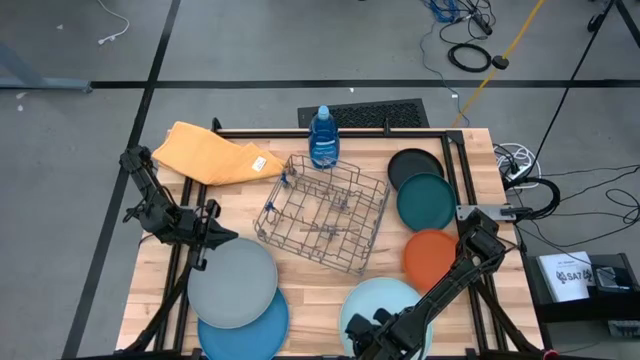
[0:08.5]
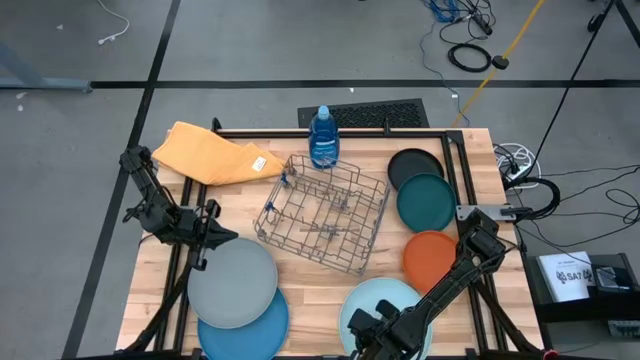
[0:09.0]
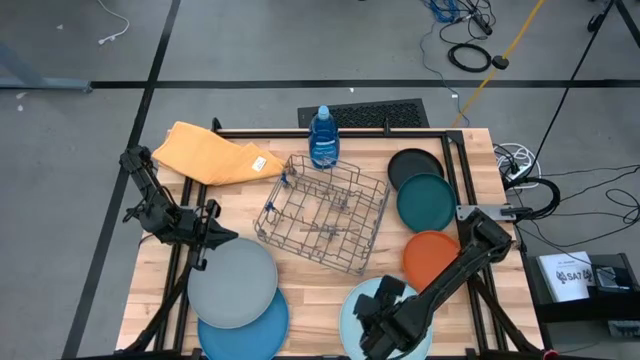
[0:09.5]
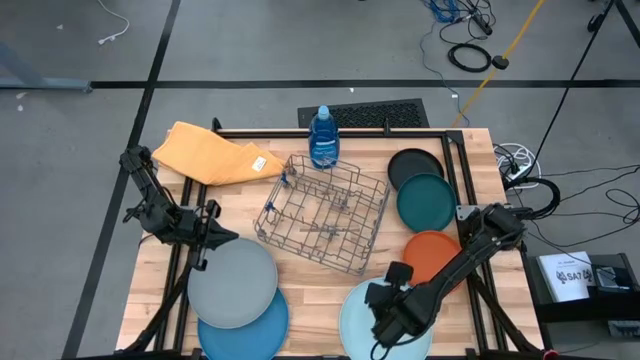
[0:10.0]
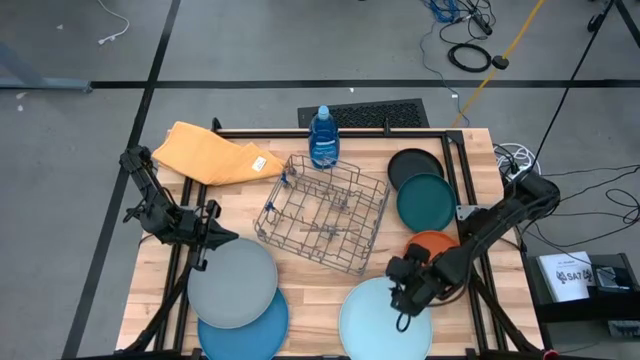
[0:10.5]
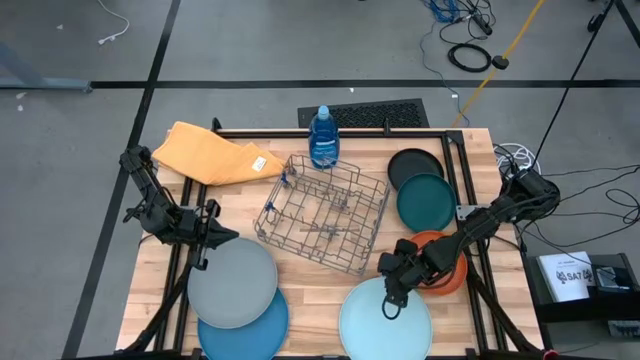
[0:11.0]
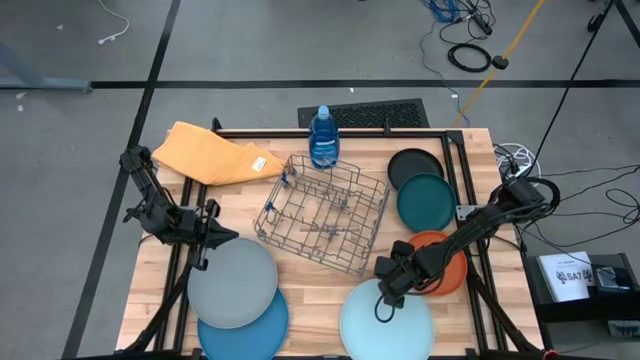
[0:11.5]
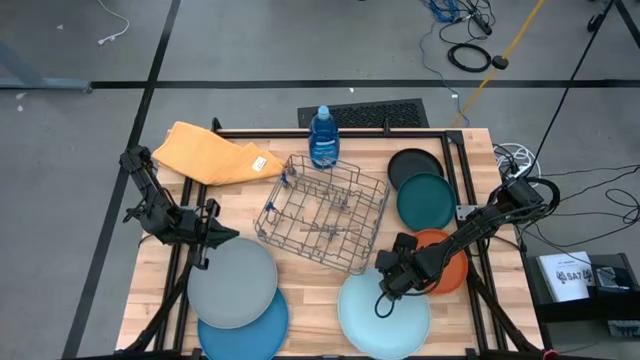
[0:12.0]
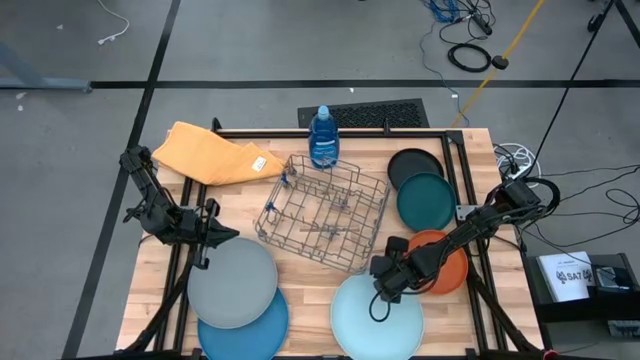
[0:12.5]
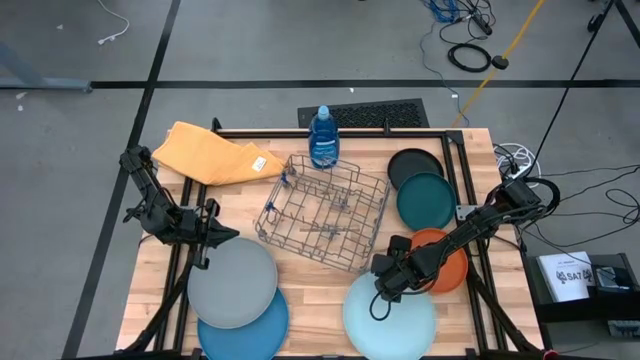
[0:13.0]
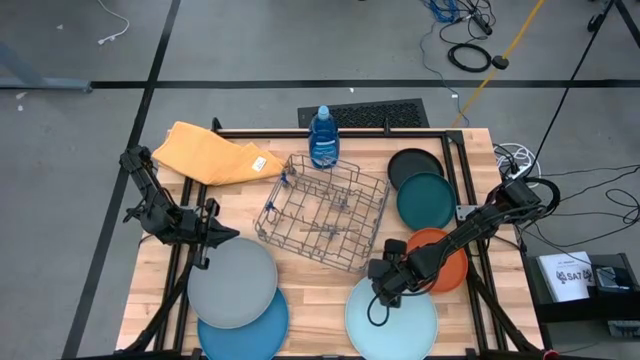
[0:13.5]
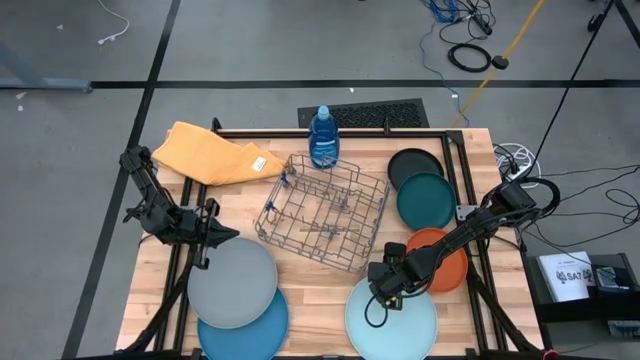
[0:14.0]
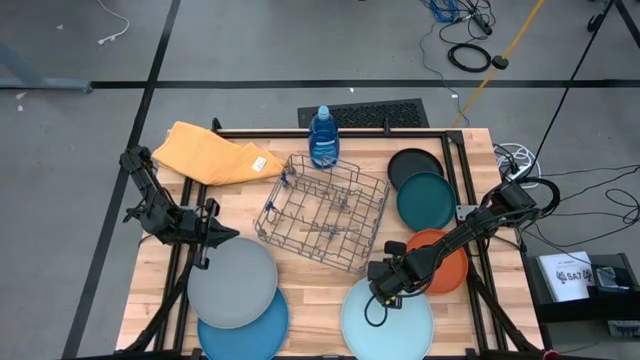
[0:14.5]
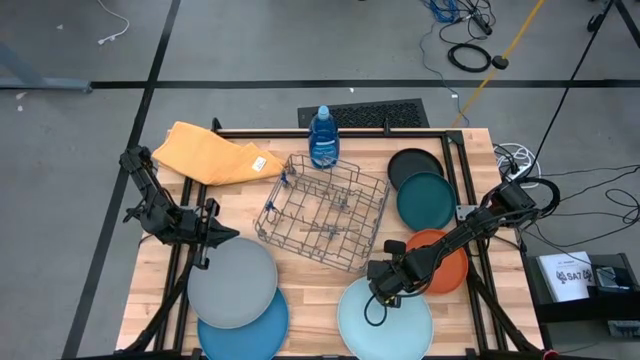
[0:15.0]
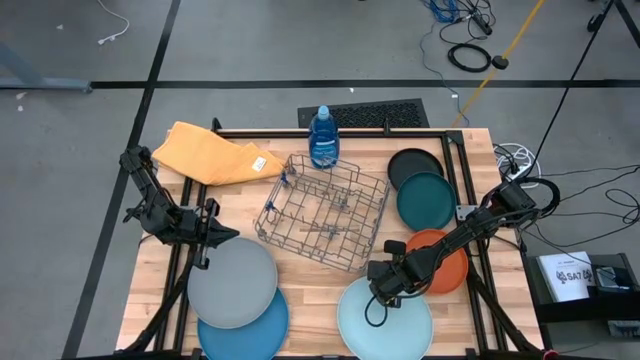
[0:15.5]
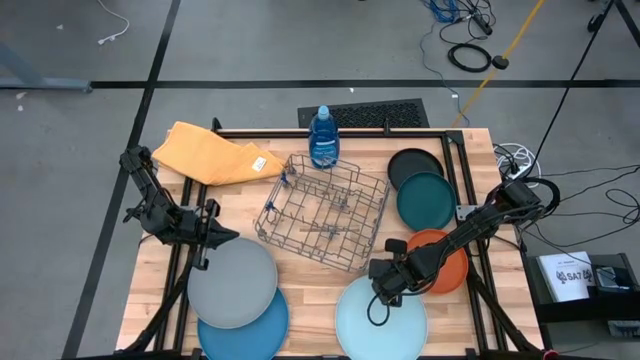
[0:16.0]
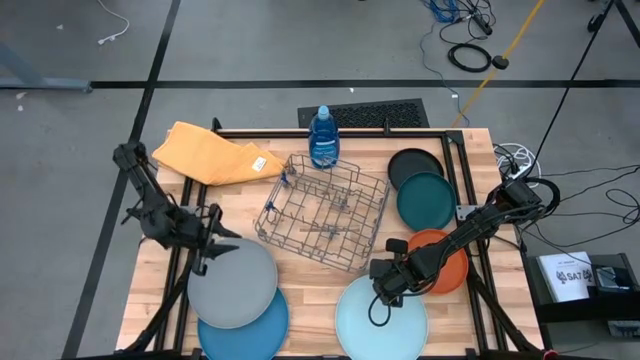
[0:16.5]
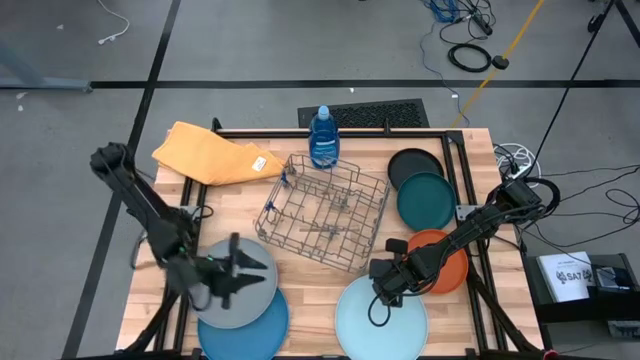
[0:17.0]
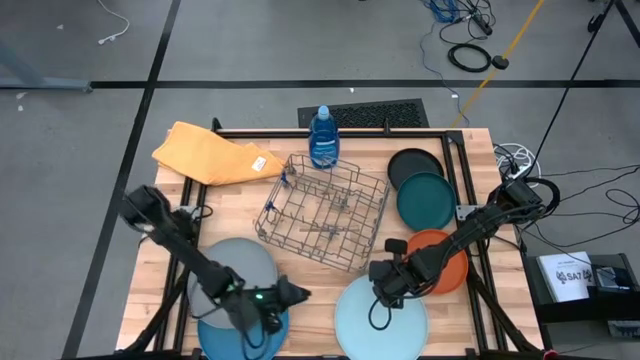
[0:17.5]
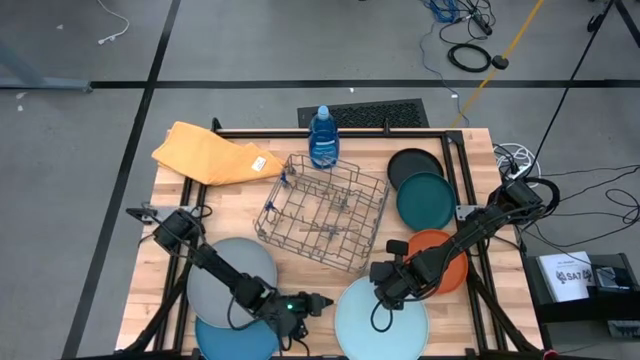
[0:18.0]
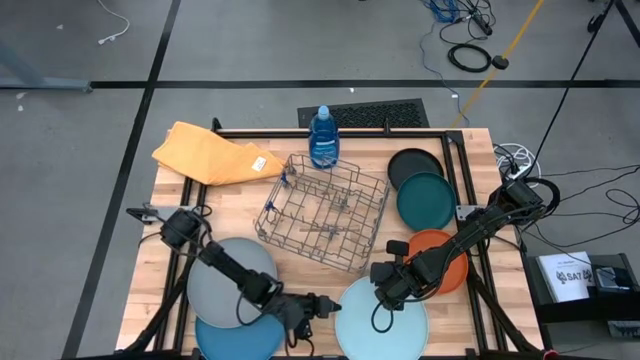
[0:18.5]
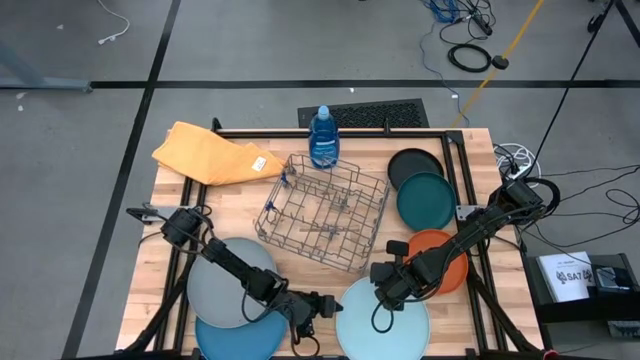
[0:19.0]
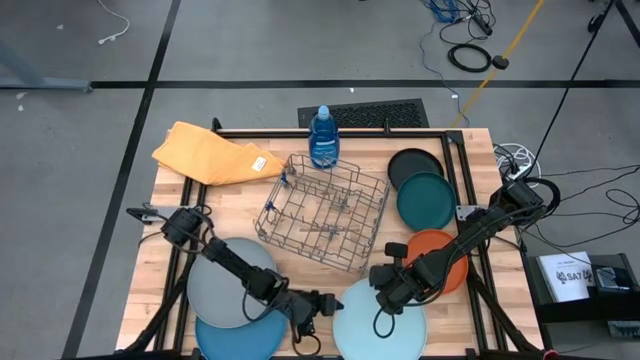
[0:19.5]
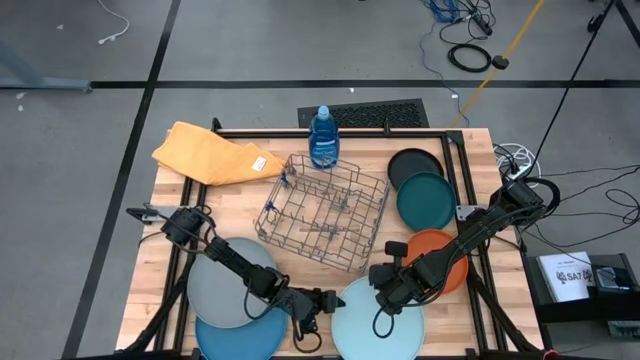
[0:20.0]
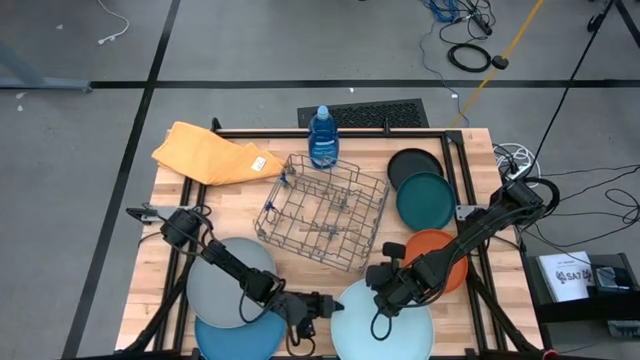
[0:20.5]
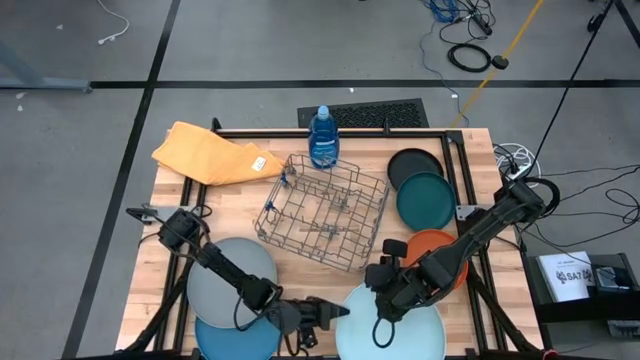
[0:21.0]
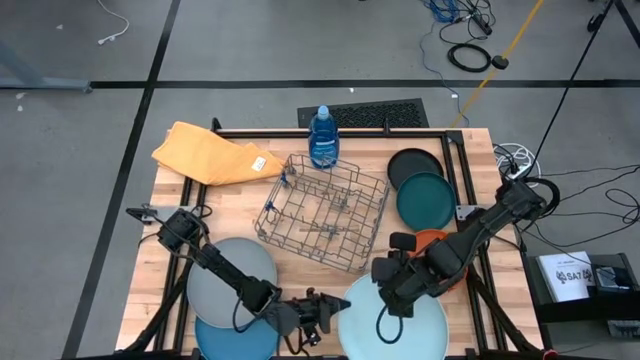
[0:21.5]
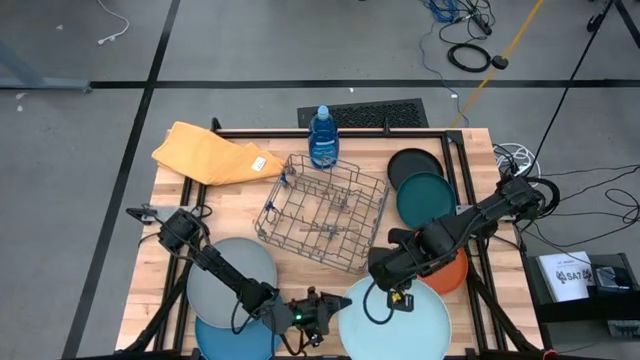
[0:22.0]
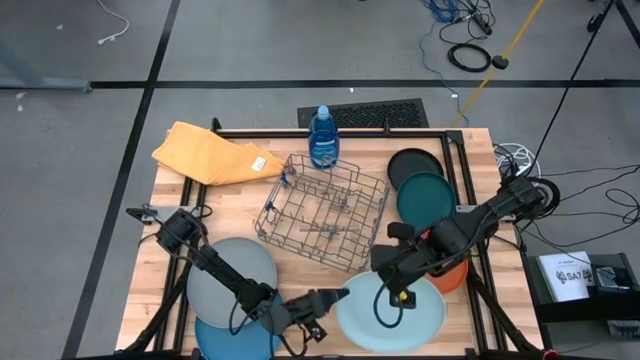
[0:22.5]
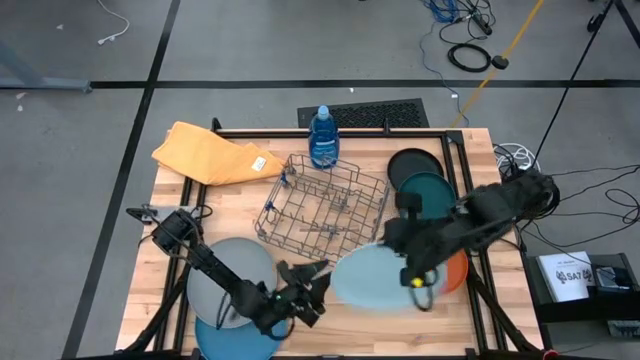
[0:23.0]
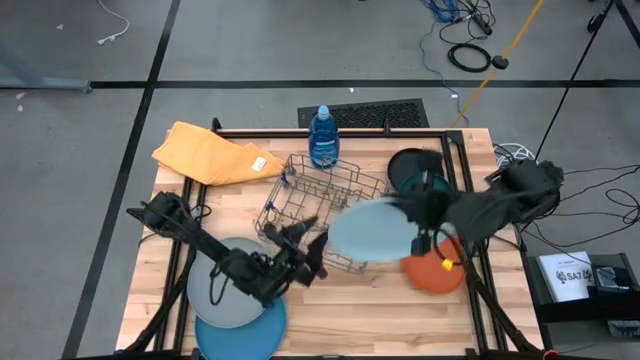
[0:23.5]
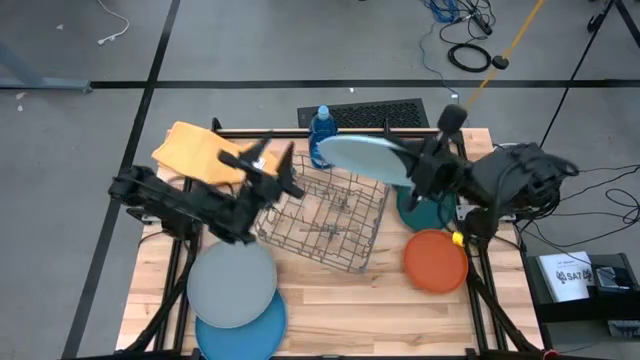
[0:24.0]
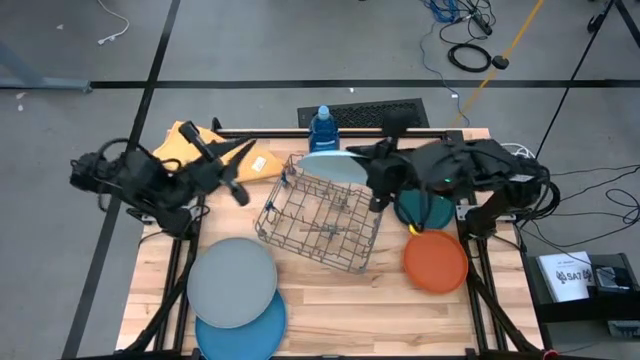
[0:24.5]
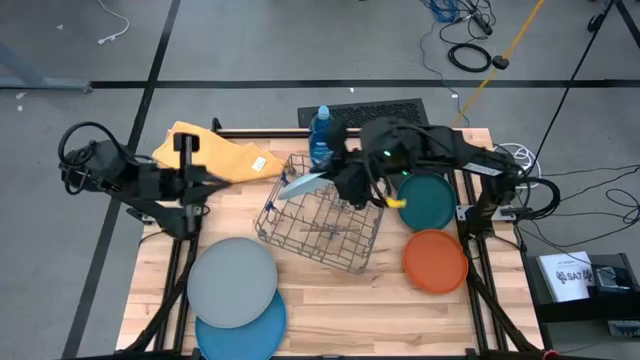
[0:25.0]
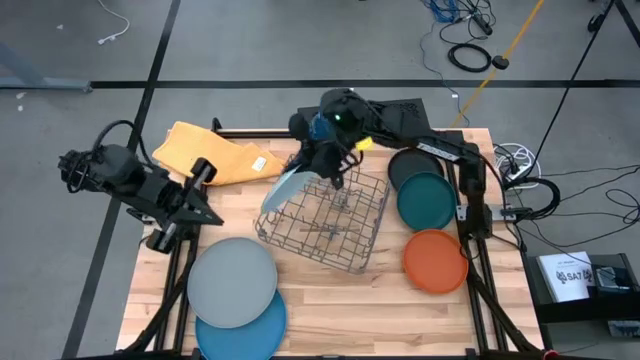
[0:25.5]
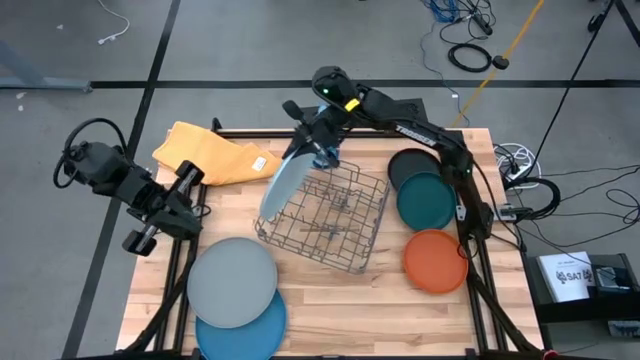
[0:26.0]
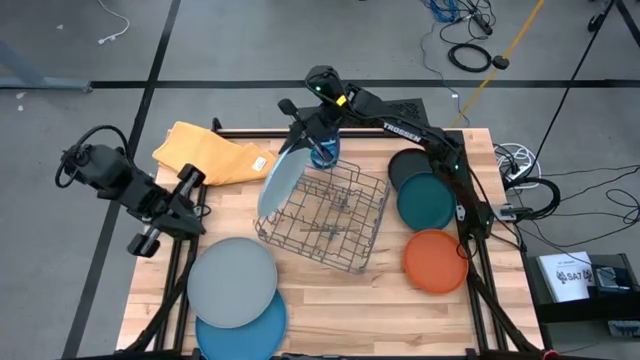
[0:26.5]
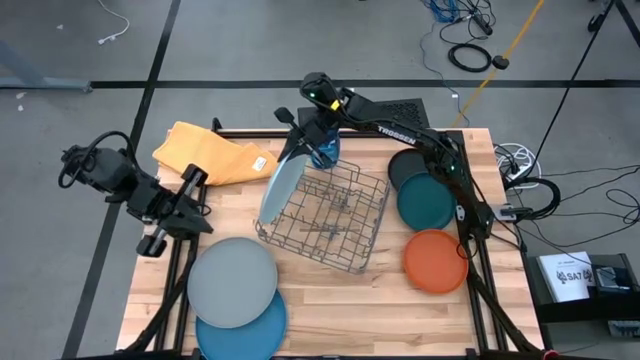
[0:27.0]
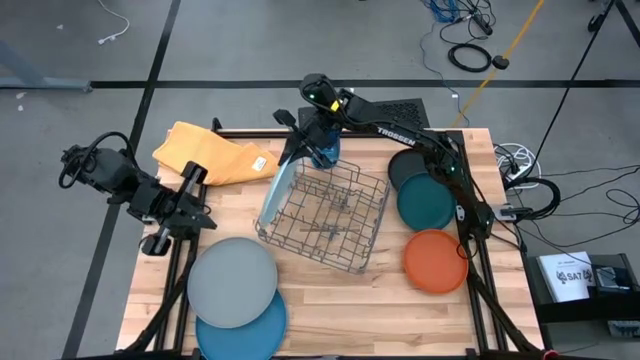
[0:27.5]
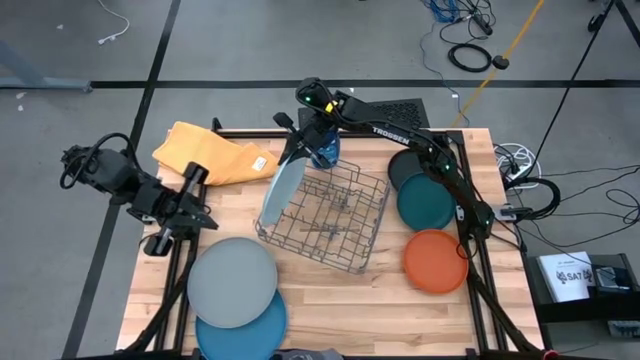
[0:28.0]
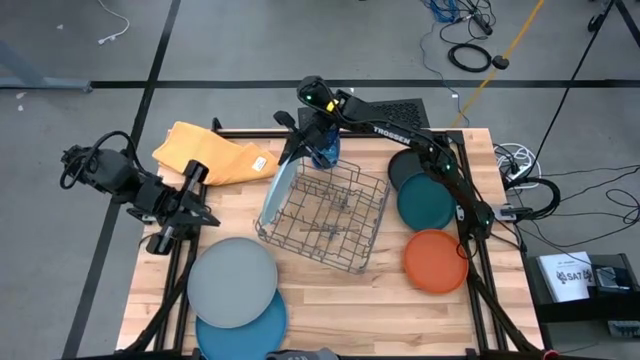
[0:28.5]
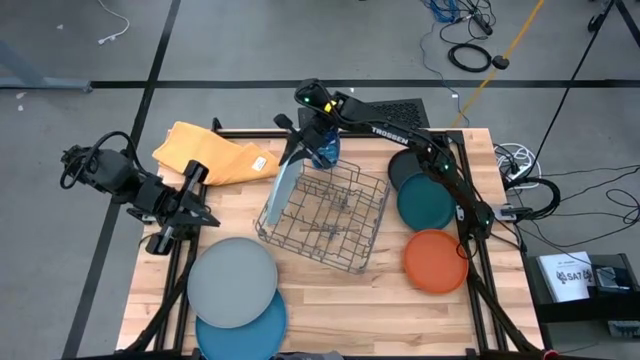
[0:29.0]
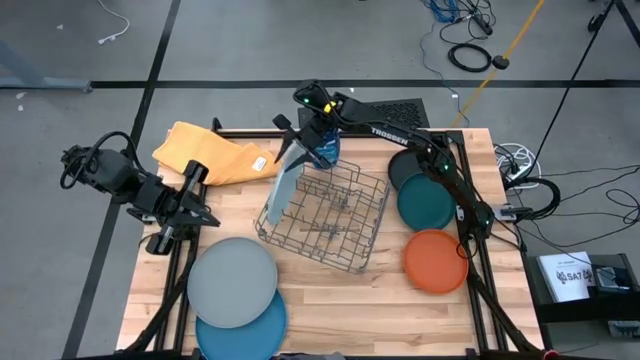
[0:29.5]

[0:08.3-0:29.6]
Task: Sort dishes
Put the white plate into the dish rack
